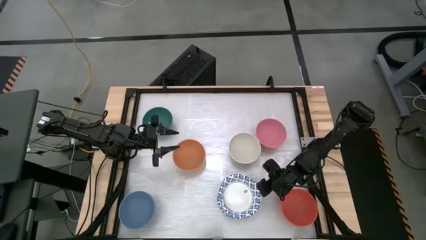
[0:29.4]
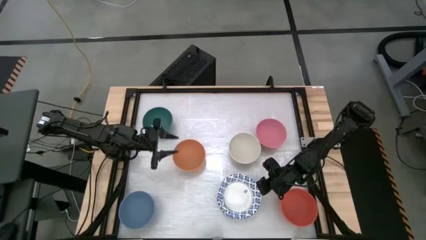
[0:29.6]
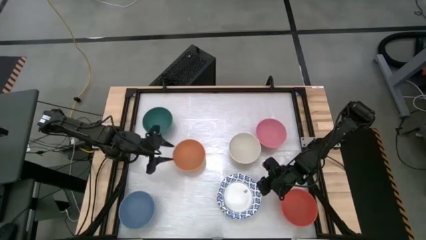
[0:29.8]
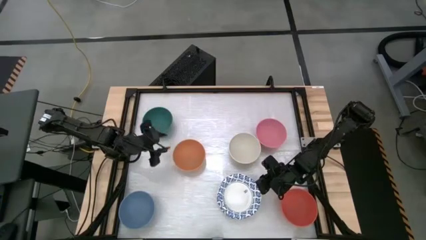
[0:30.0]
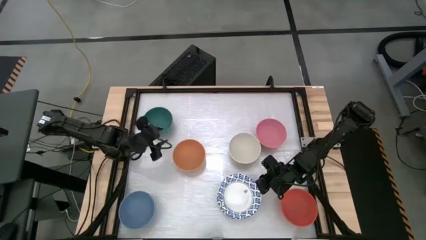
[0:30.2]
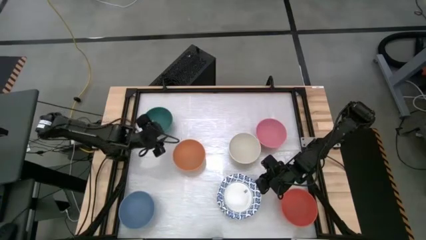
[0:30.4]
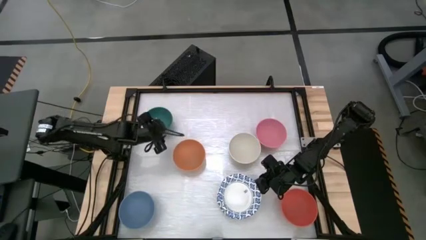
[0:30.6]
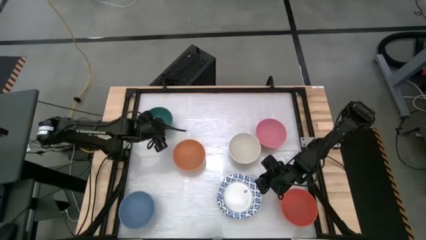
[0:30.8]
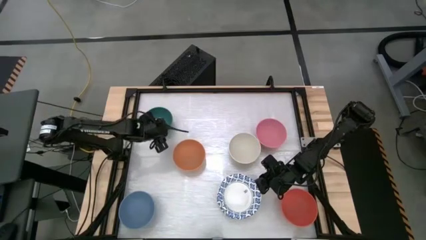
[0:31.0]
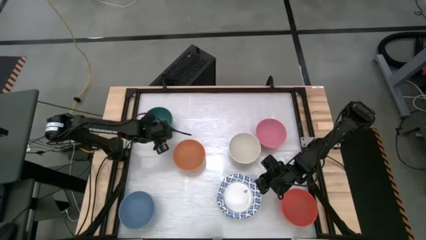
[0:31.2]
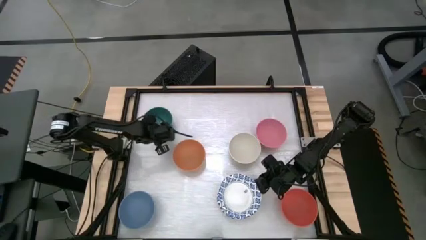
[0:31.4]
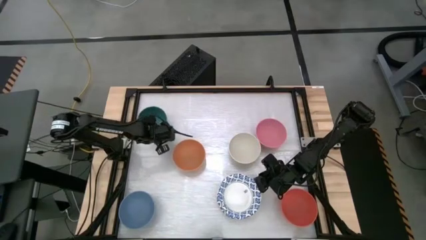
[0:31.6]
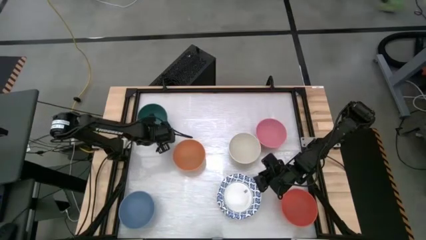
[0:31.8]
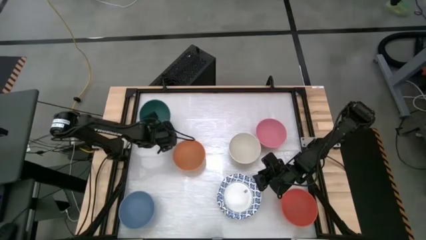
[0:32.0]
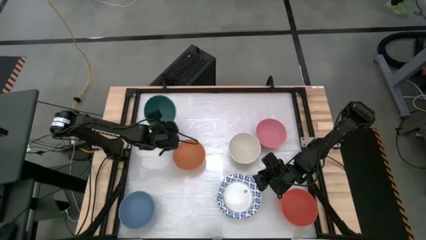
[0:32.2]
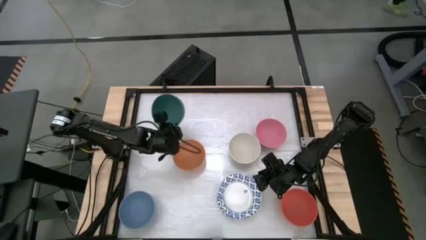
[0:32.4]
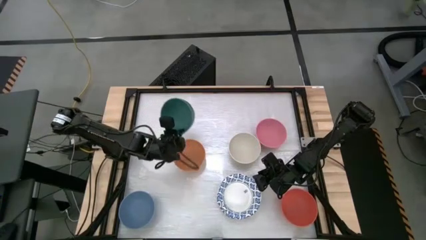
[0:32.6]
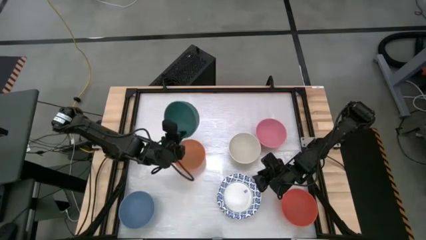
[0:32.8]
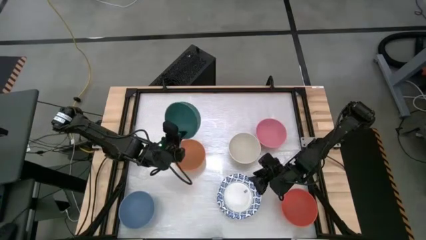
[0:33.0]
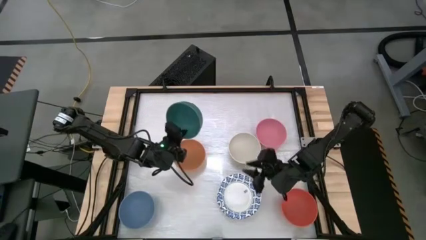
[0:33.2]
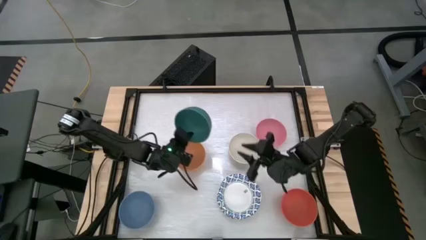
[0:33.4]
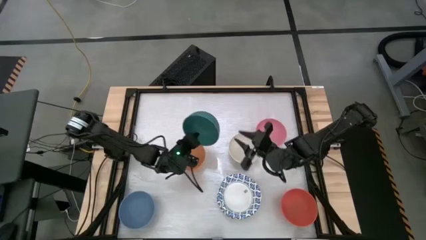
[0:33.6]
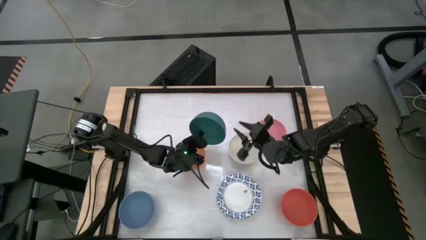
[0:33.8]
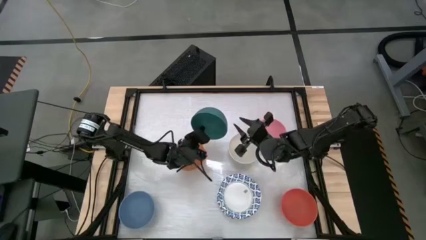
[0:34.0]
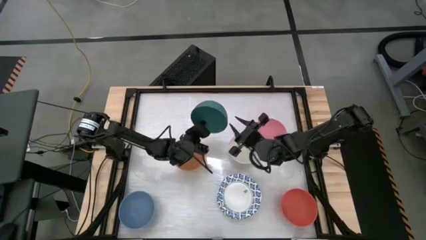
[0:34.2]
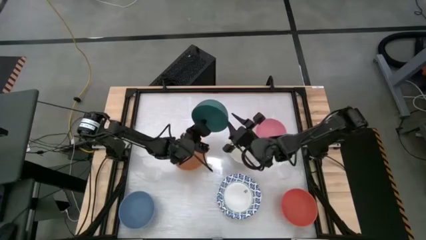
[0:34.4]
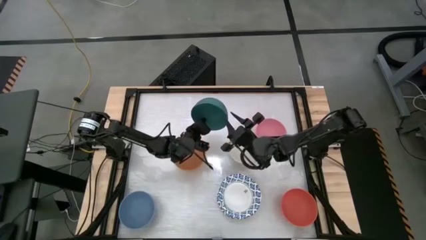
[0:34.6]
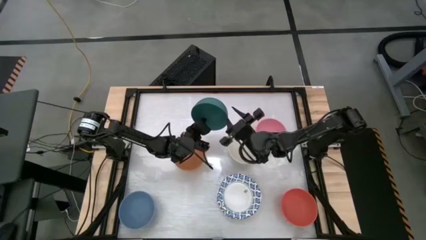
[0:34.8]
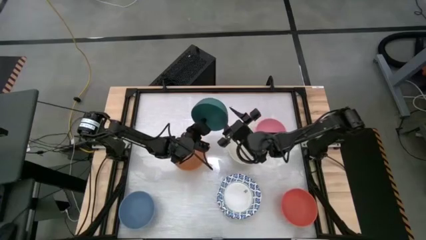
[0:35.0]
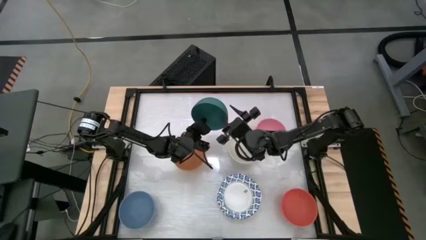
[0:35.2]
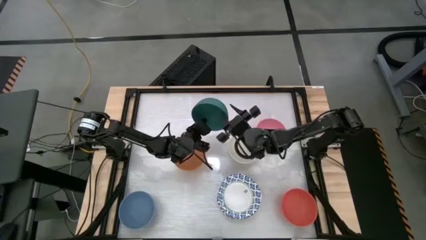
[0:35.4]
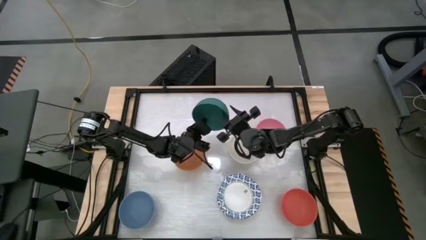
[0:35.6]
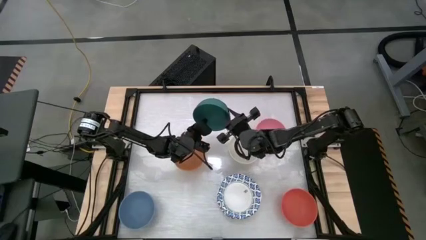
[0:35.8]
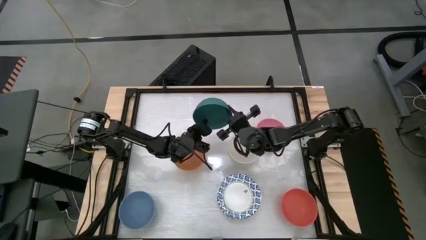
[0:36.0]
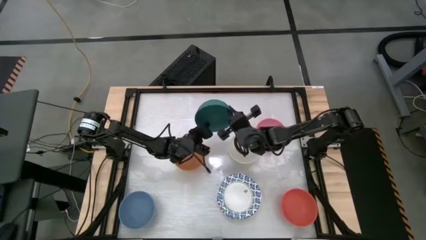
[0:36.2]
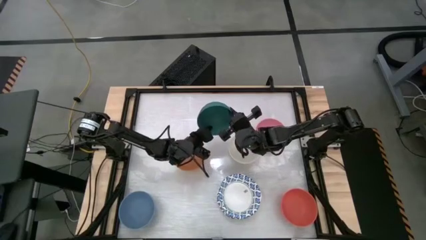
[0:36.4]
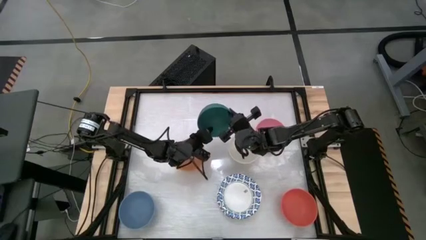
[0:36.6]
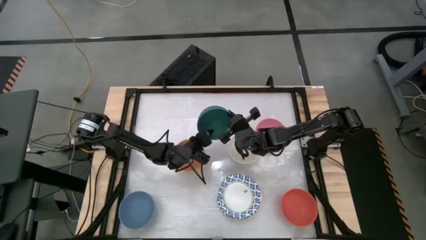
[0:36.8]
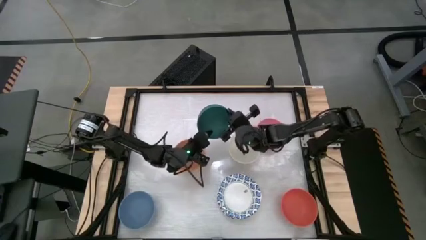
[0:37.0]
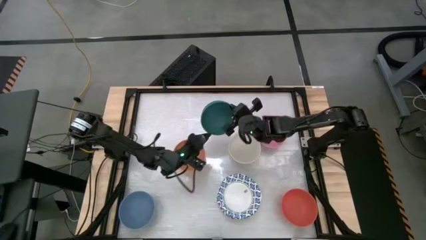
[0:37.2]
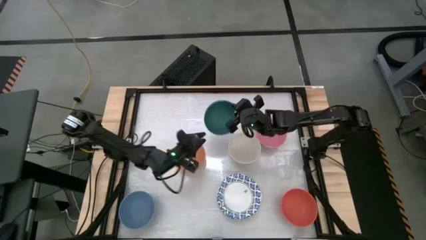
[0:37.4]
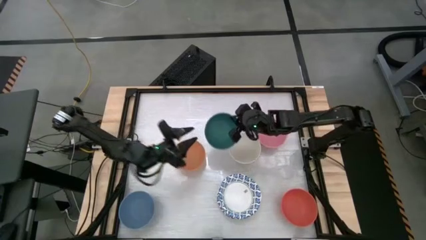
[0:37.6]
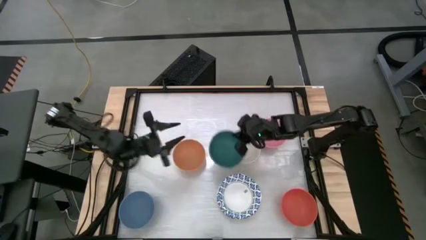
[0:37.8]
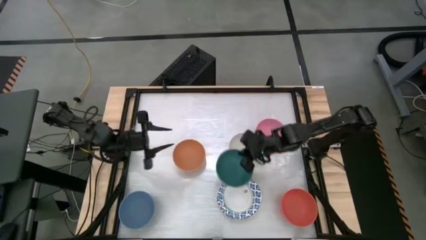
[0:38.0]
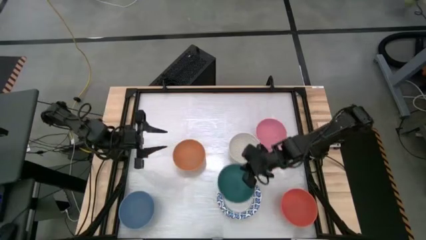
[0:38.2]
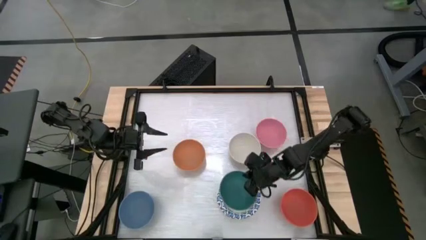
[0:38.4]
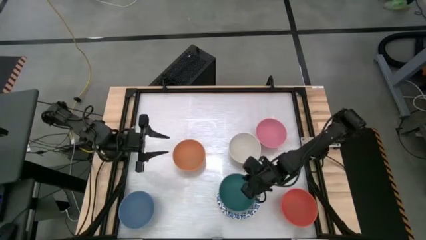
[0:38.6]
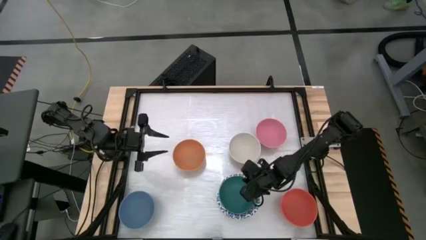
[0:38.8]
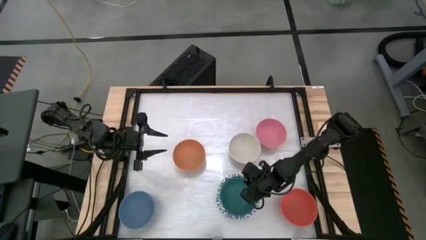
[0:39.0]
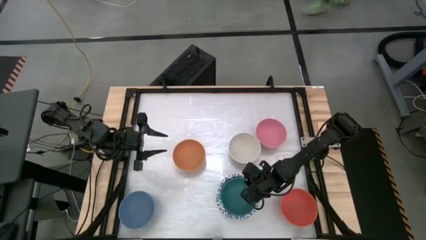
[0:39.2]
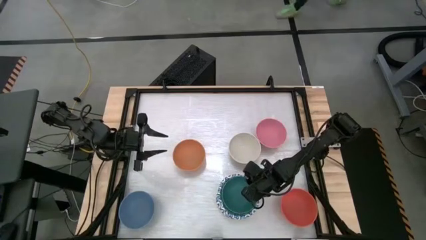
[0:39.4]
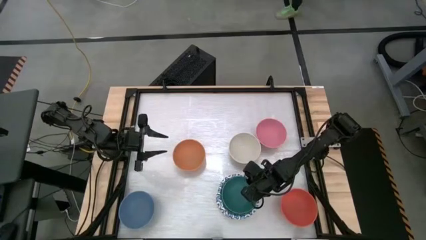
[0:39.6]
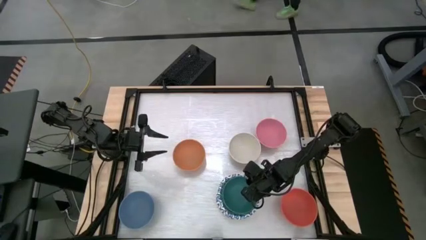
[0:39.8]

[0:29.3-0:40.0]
Stack the green bowl into the white paper bowl
